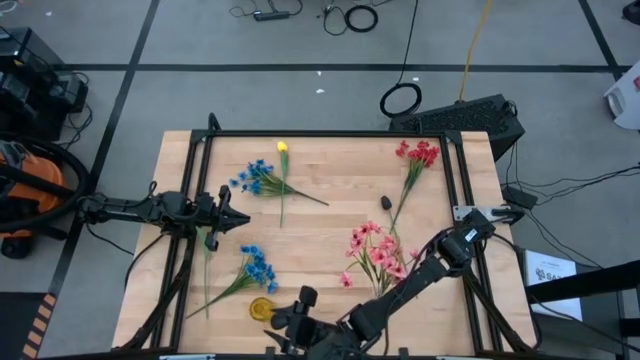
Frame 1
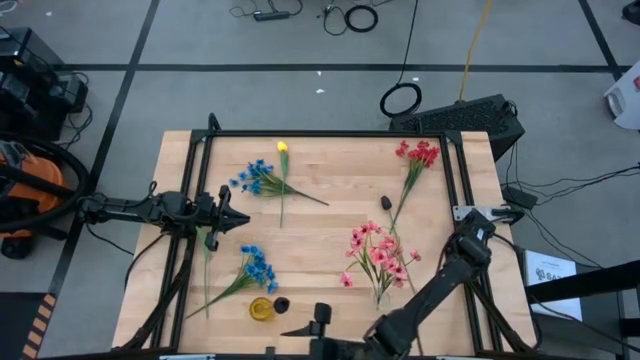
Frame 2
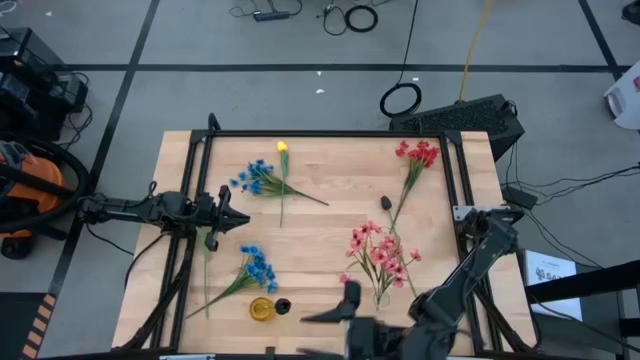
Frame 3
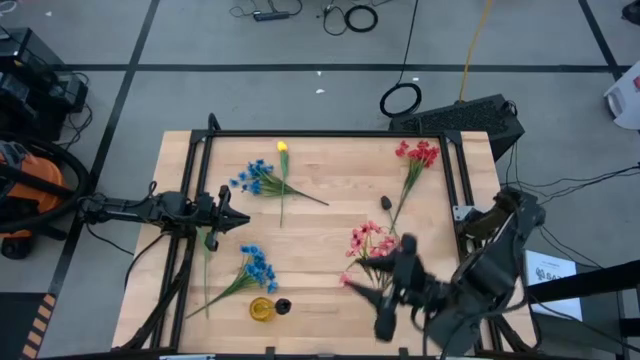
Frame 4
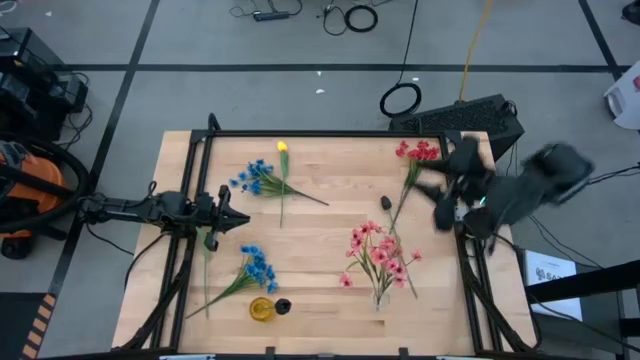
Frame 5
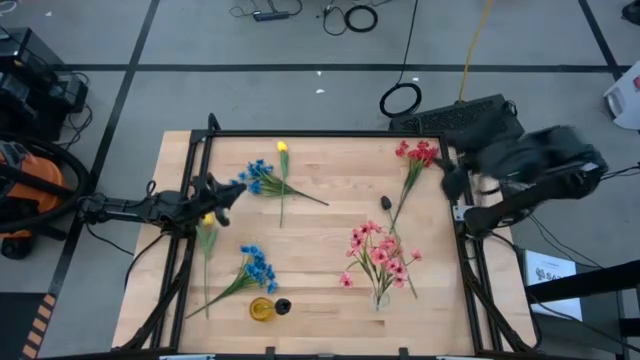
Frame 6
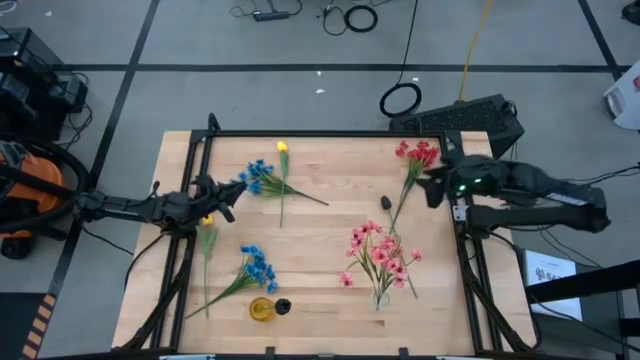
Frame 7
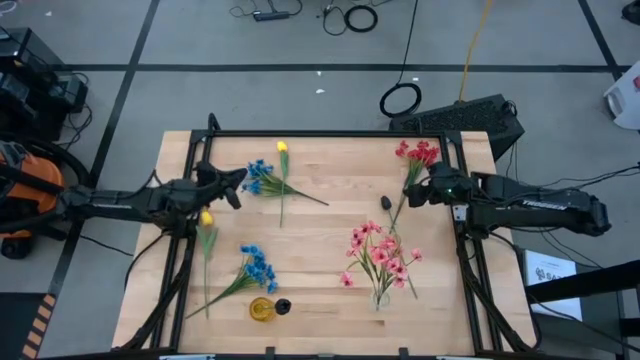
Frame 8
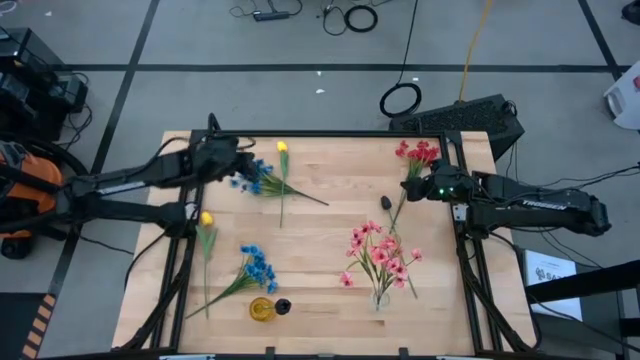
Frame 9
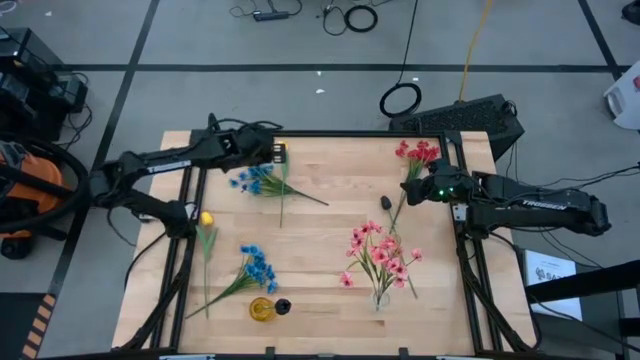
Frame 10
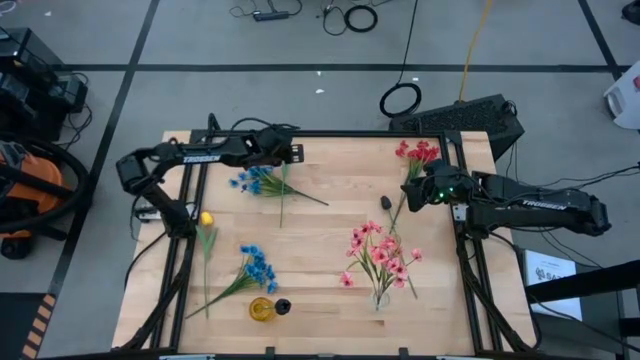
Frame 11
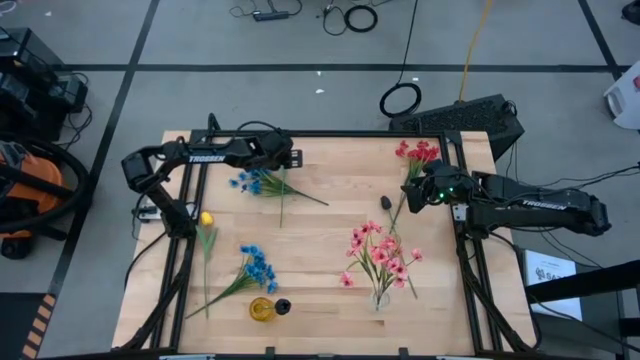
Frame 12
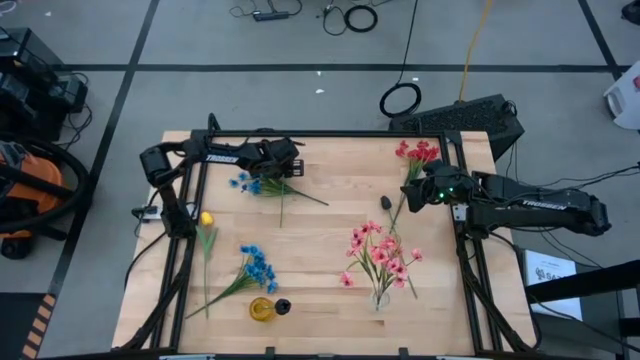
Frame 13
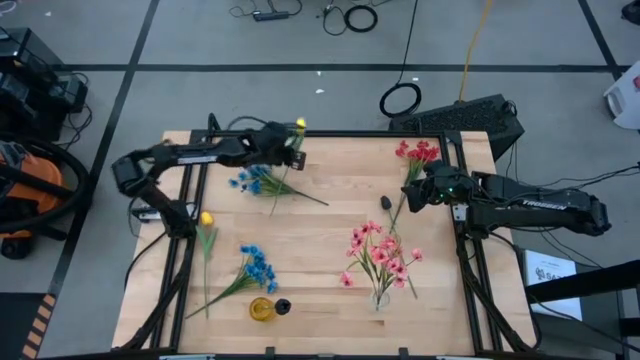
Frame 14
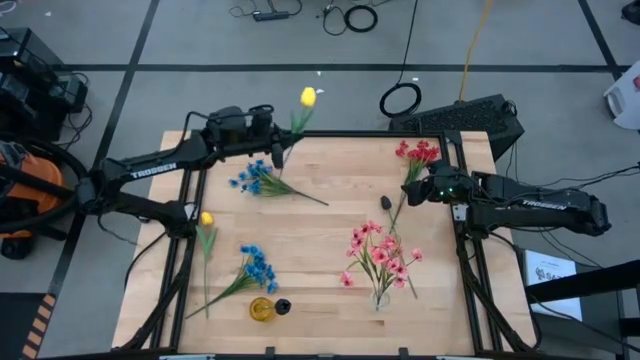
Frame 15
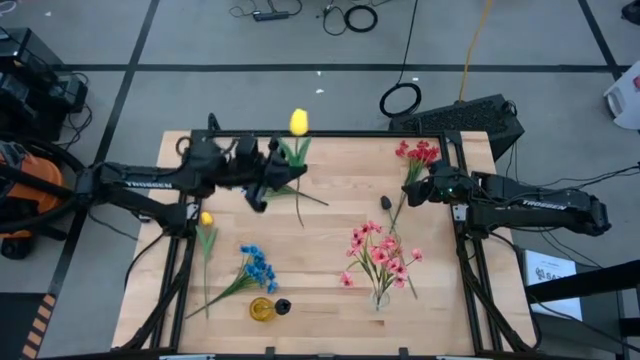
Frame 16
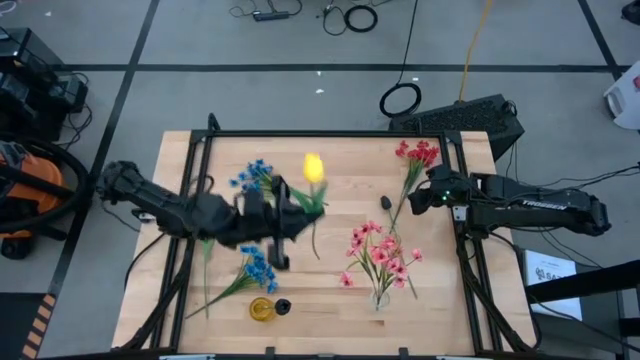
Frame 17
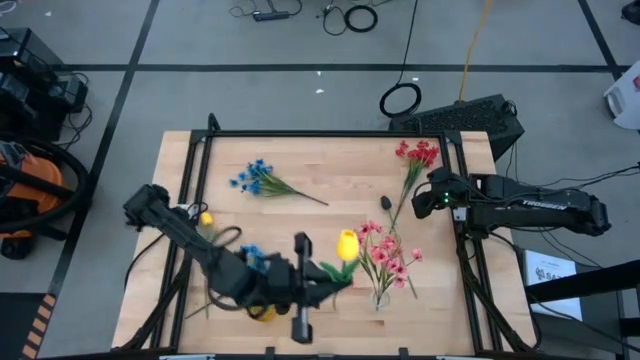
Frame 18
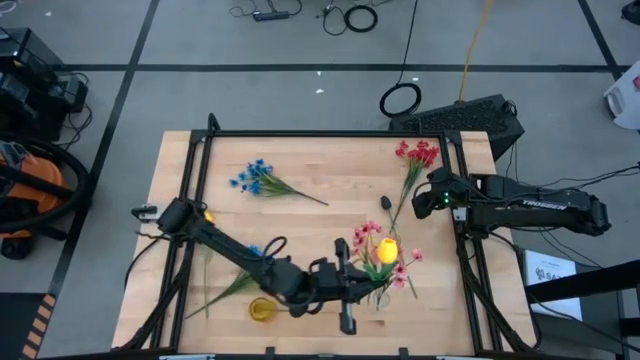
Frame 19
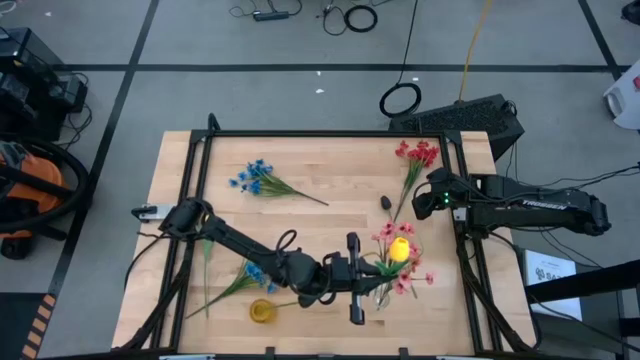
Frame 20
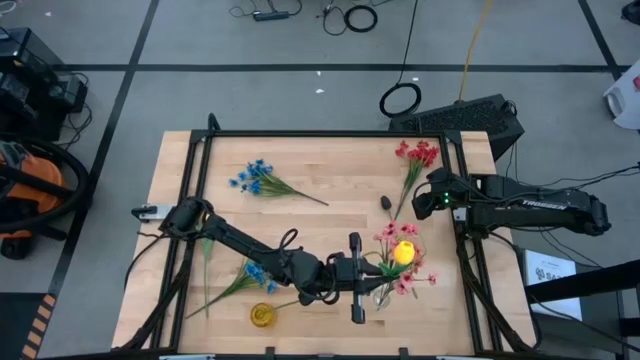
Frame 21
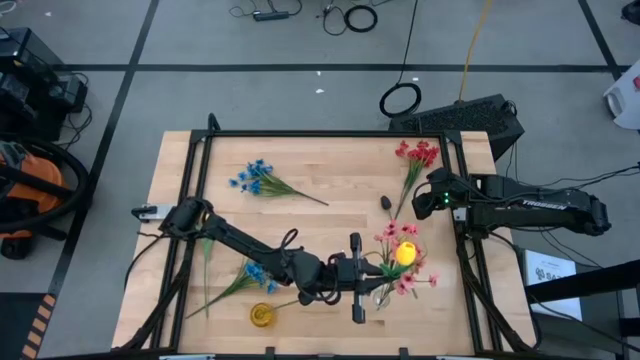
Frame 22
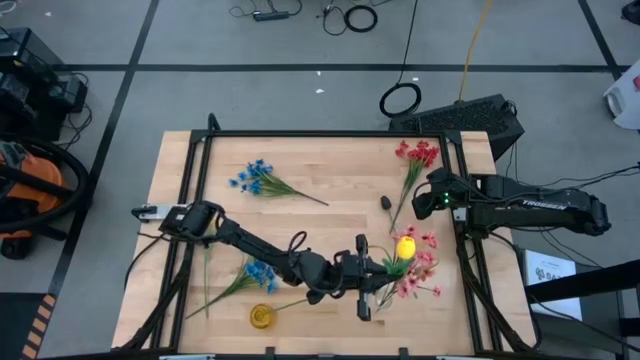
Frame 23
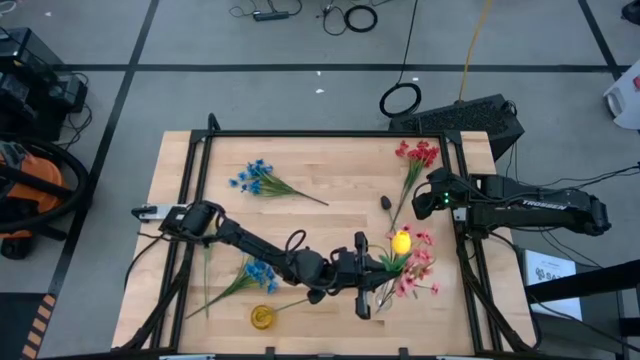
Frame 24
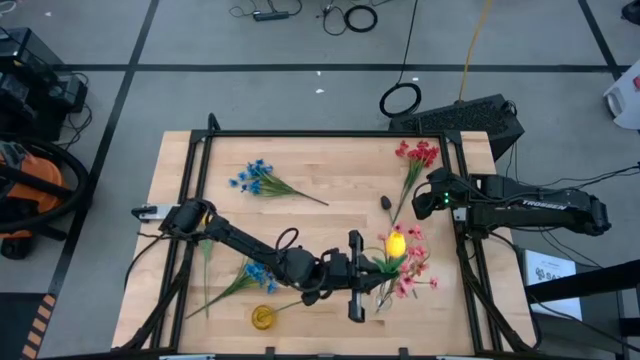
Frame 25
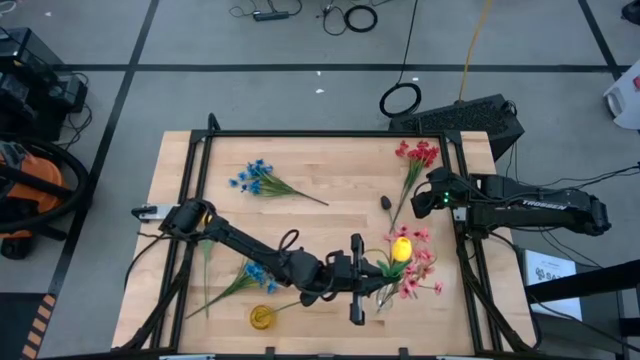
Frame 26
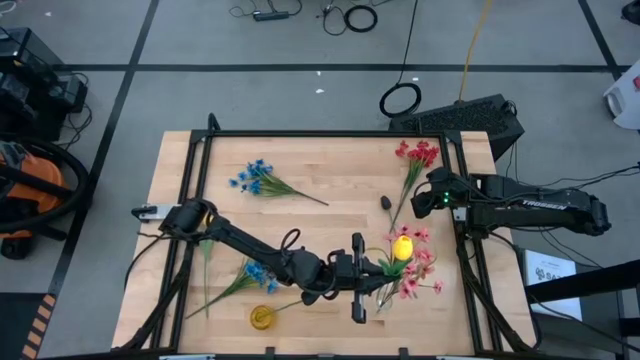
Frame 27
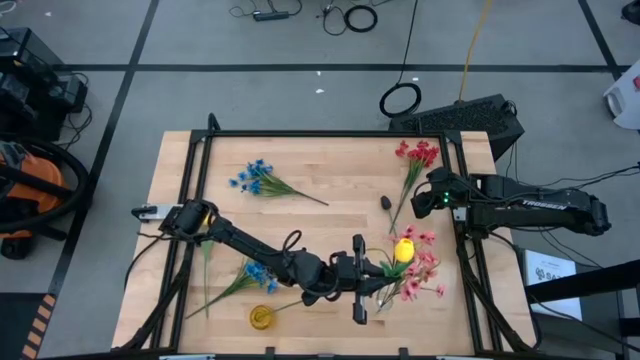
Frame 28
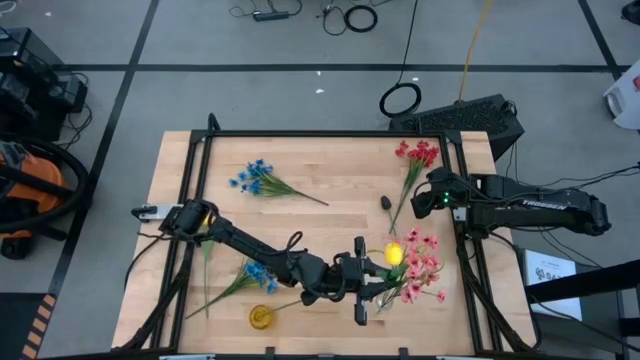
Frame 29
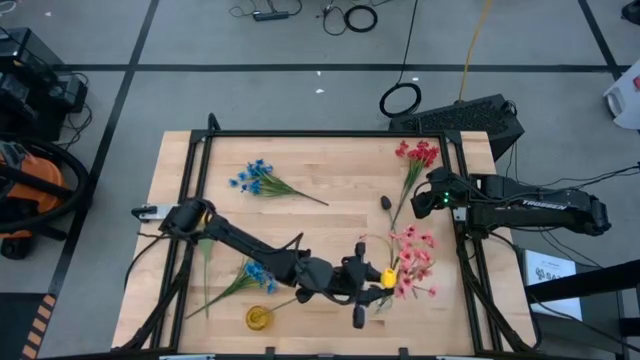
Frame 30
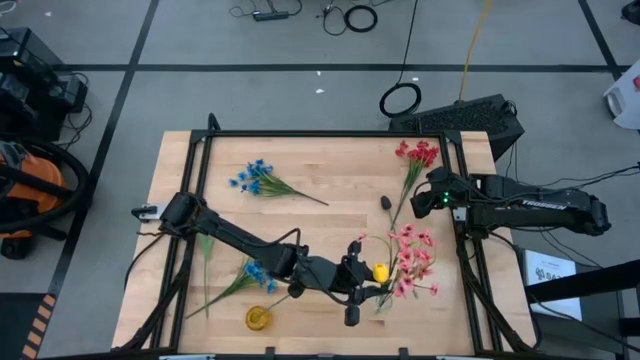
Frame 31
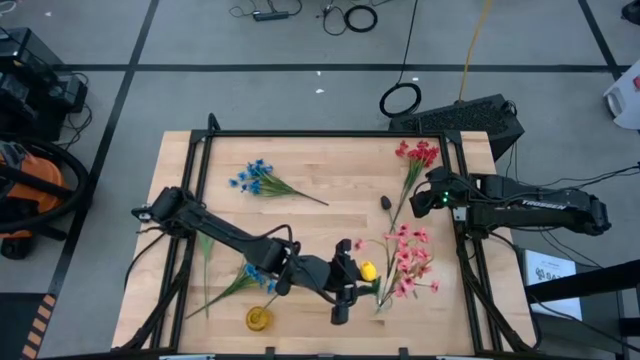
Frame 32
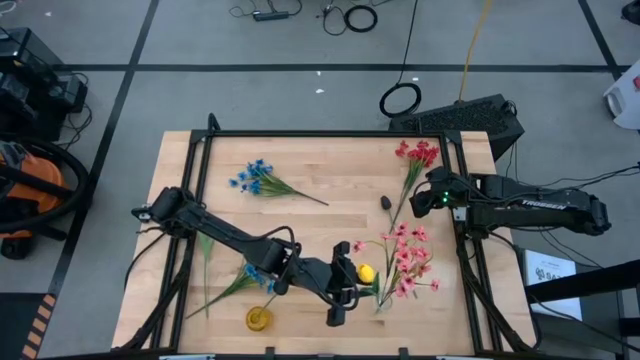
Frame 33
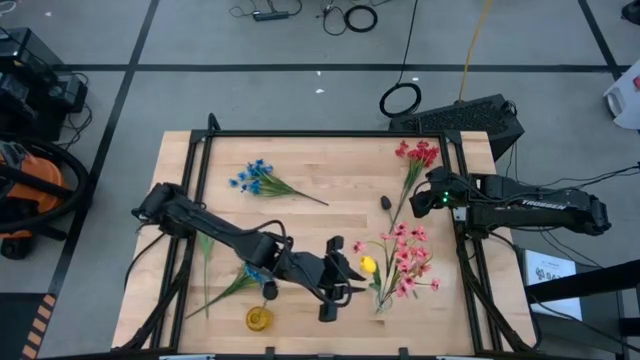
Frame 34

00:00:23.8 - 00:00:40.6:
Task: Sort flowers into vase by color
Put the top yellow tulip into the transparent vase

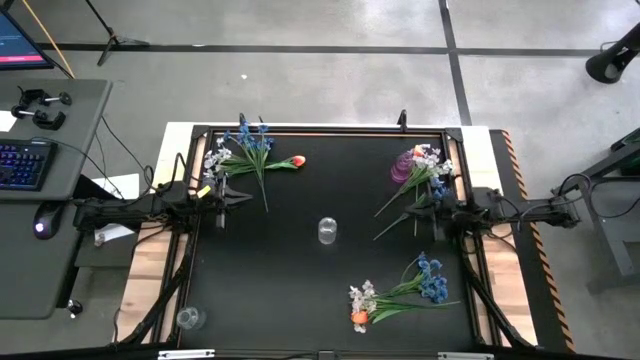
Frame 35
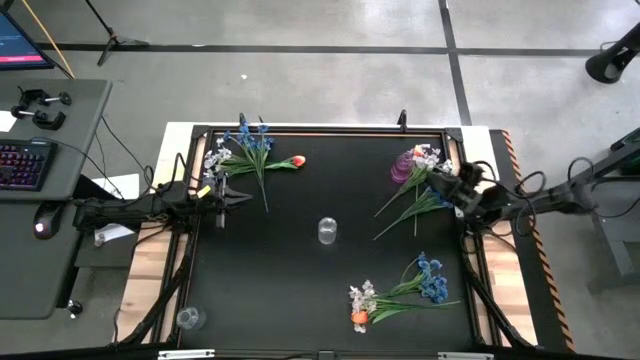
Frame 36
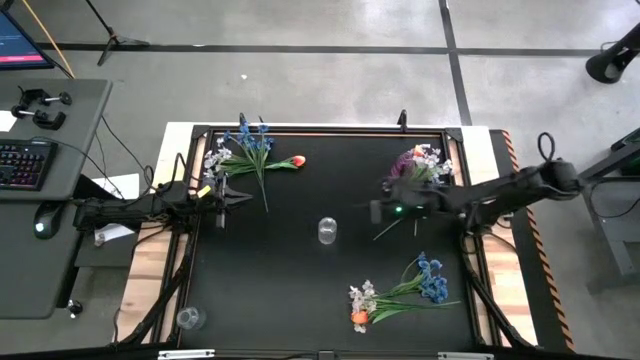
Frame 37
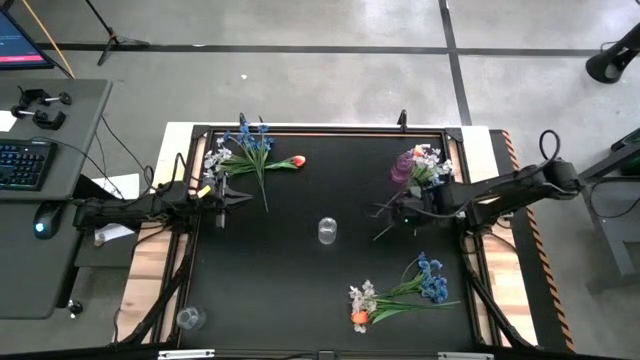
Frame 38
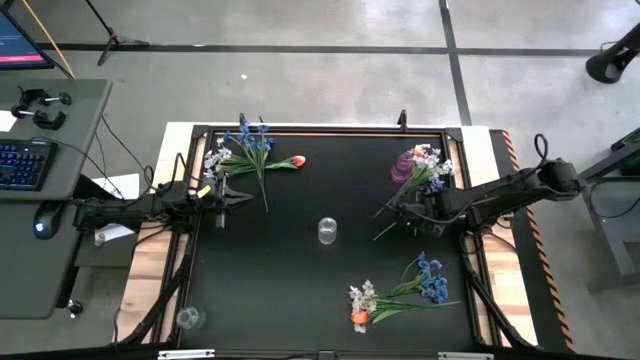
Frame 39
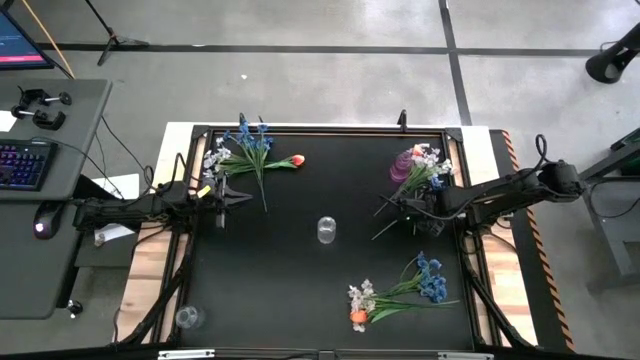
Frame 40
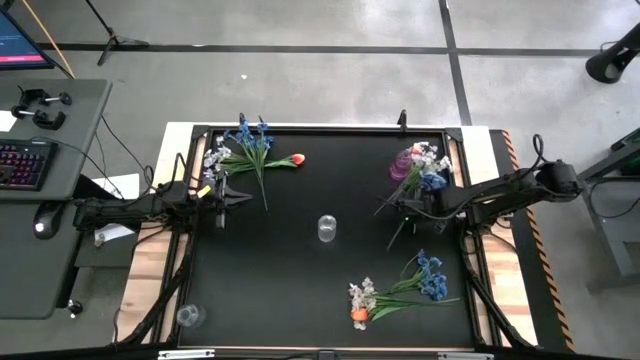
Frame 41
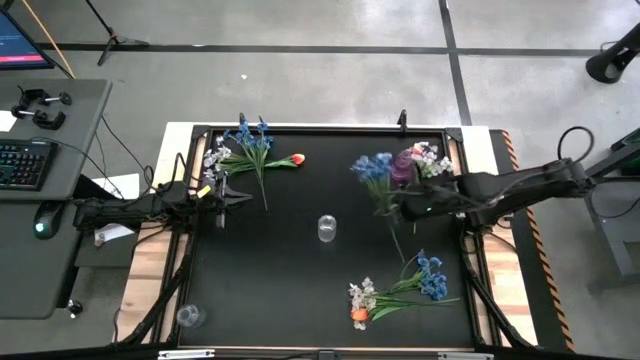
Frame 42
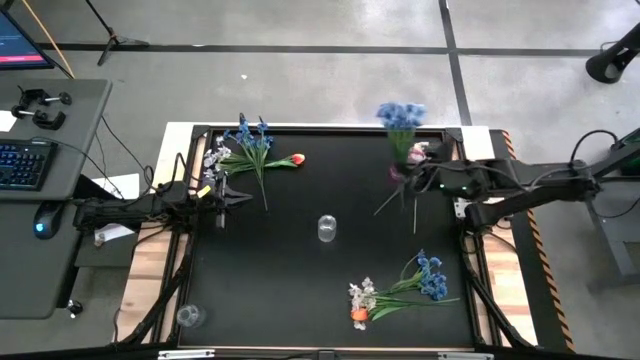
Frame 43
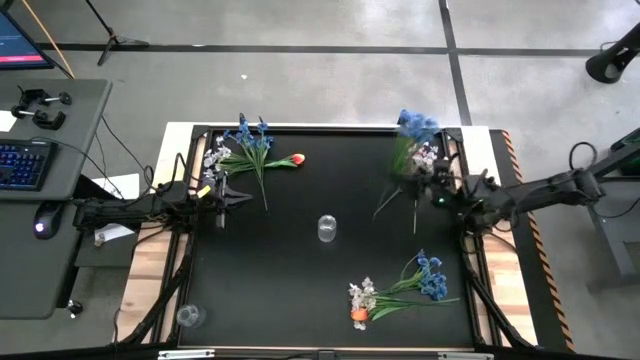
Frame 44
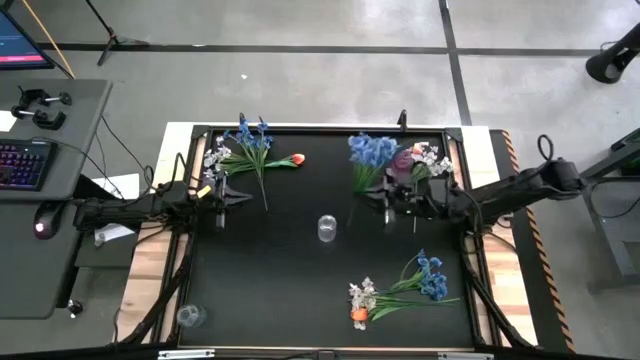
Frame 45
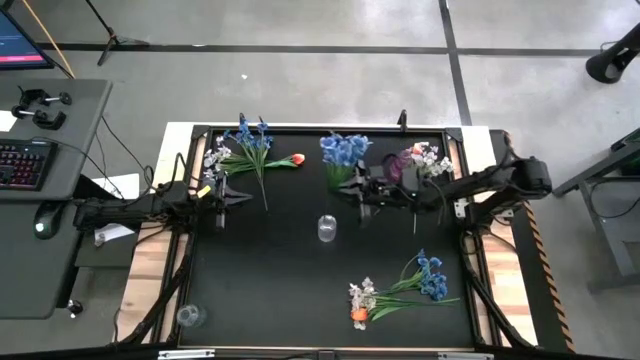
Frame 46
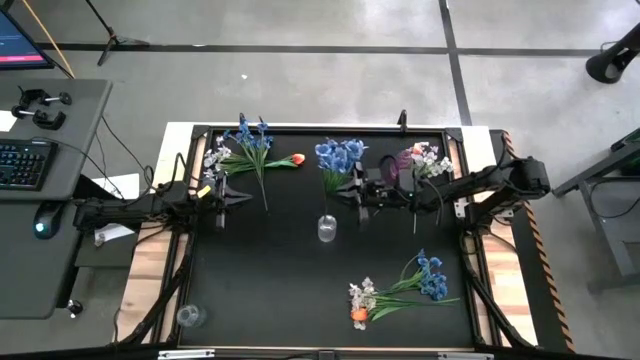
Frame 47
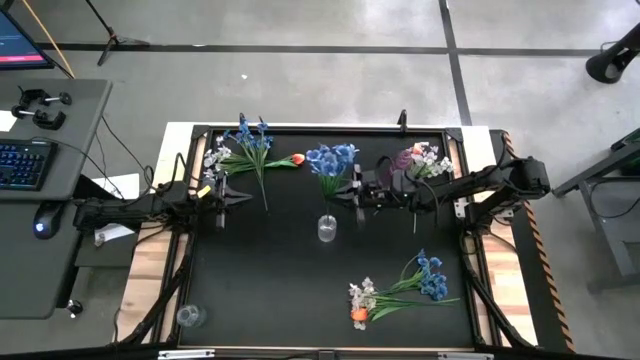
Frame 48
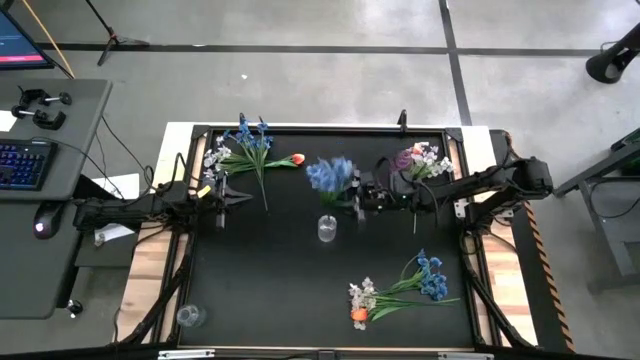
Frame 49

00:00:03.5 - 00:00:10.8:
Task: Sort flowers into vase by color
Put the top right blue flowers into the top transparent vase
